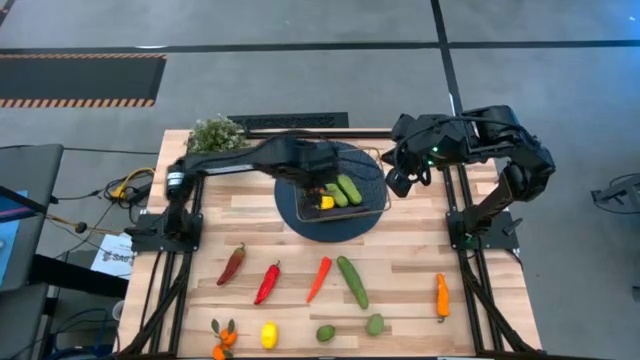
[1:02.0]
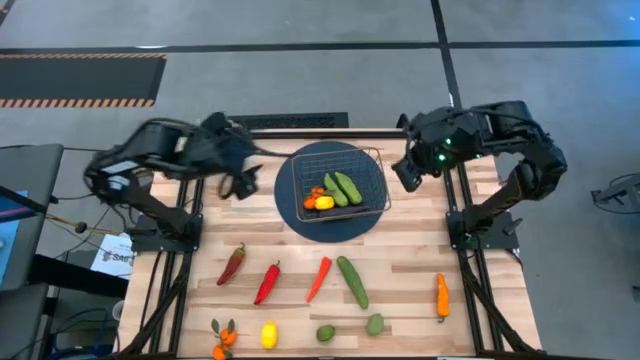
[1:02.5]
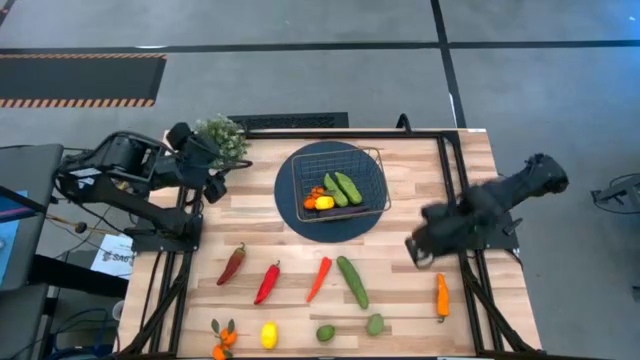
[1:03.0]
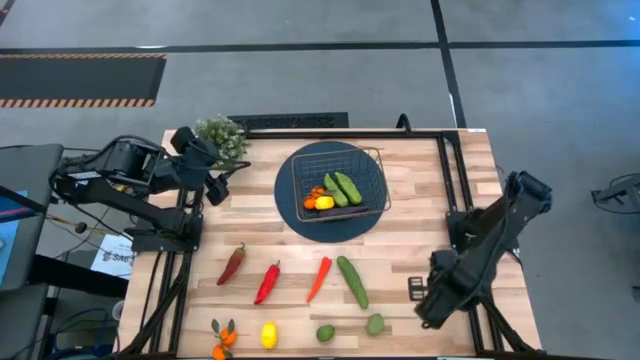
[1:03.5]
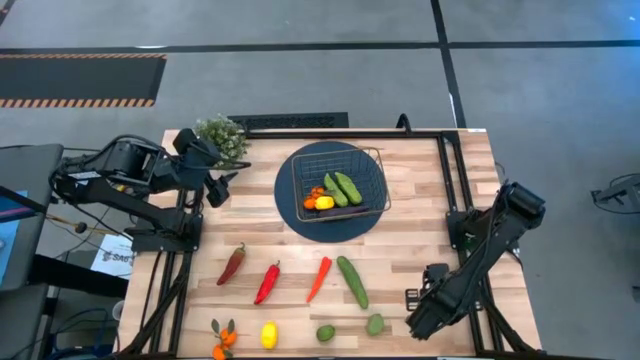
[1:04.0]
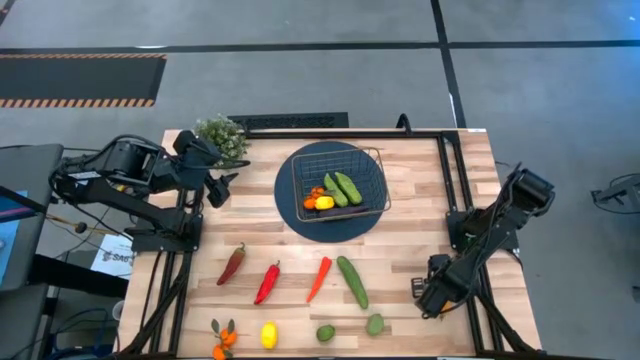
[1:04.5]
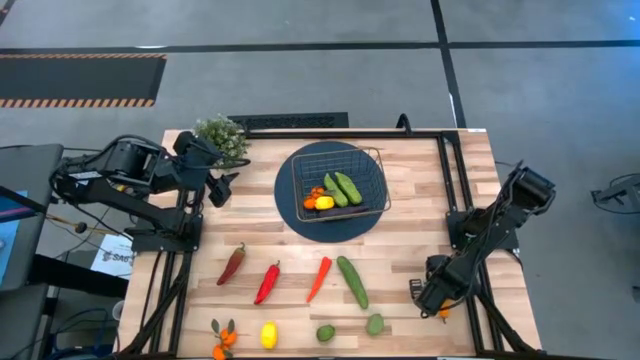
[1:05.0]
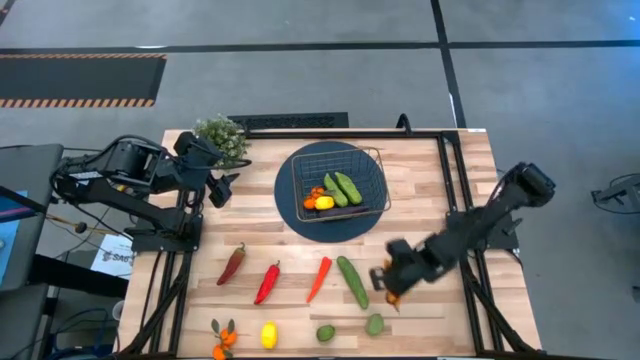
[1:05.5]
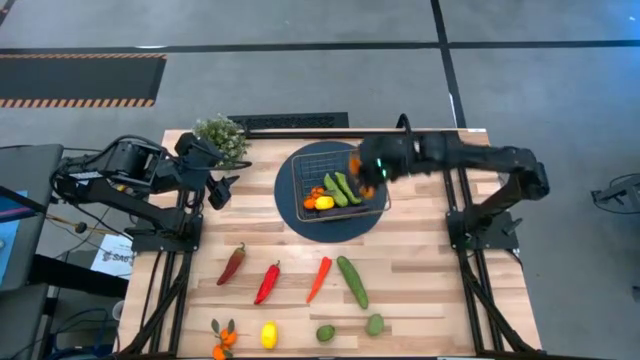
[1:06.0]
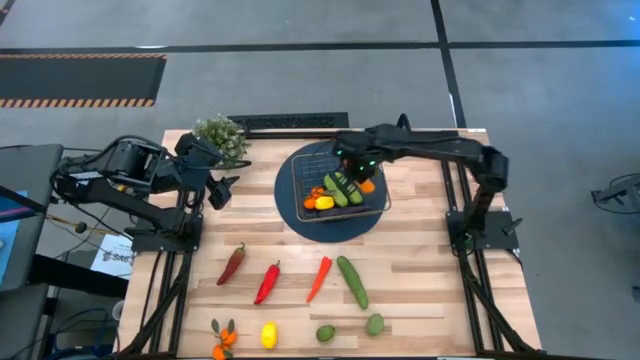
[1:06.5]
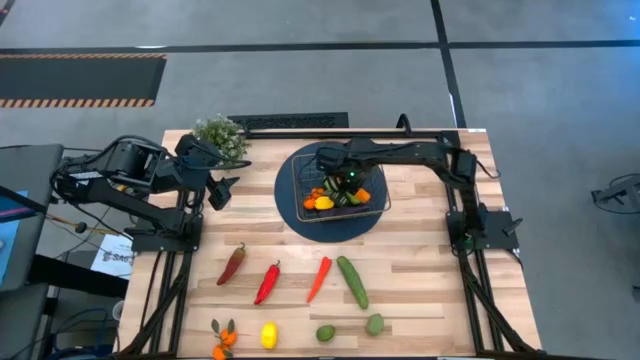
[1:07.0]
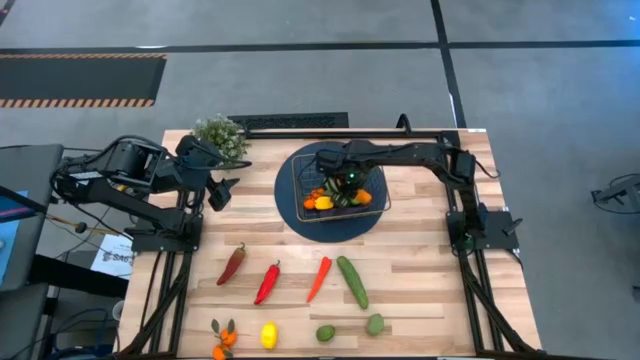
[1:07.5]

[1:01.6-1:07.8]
Task: Build produce basket
Put the orange bell pepper into the basket

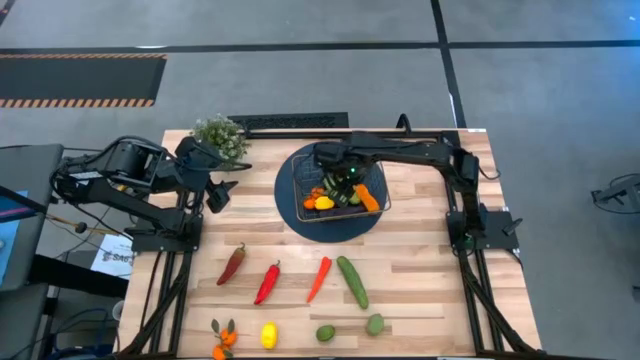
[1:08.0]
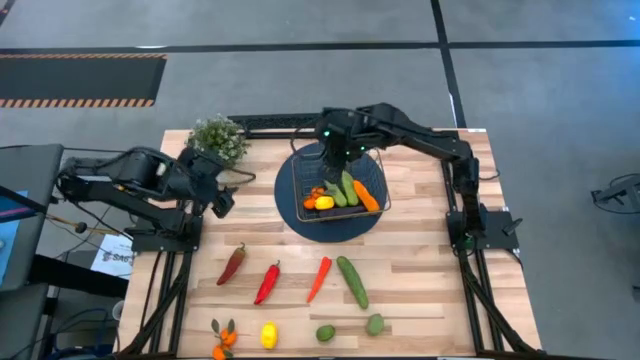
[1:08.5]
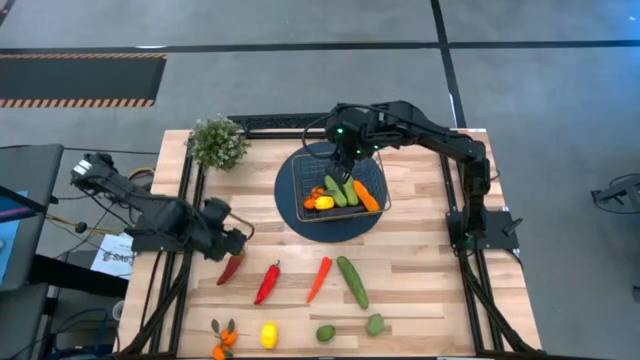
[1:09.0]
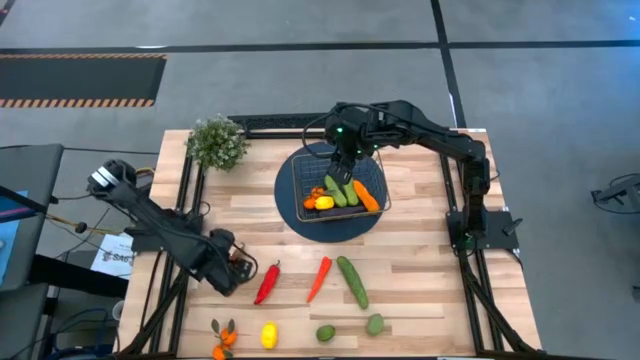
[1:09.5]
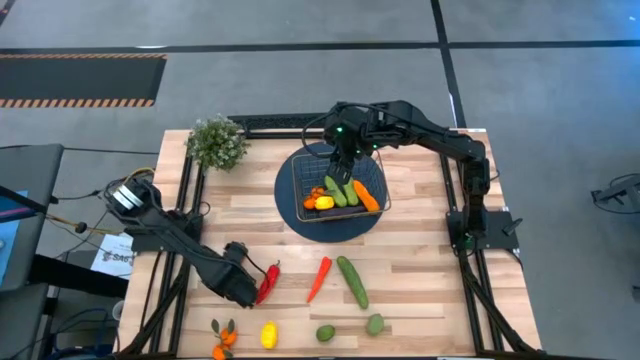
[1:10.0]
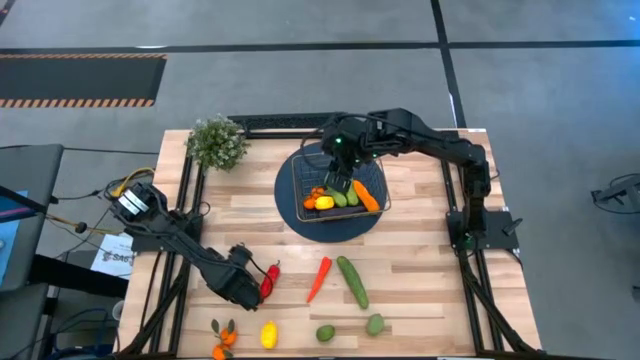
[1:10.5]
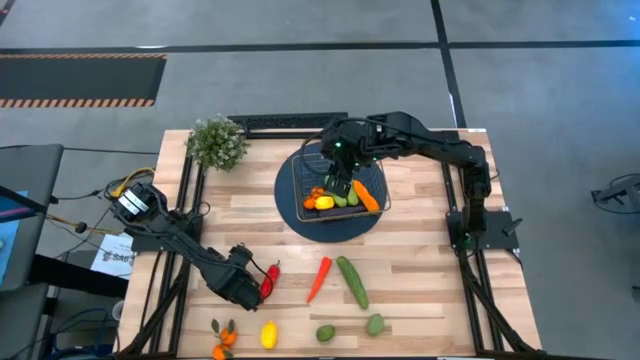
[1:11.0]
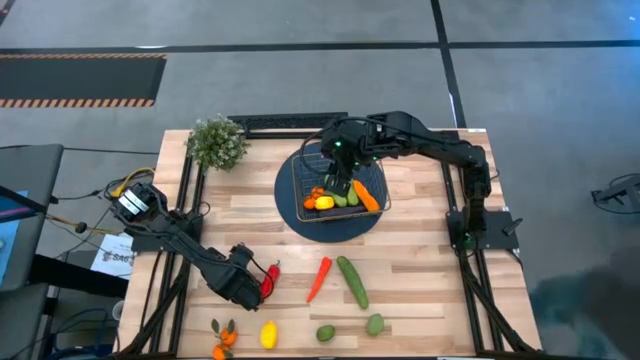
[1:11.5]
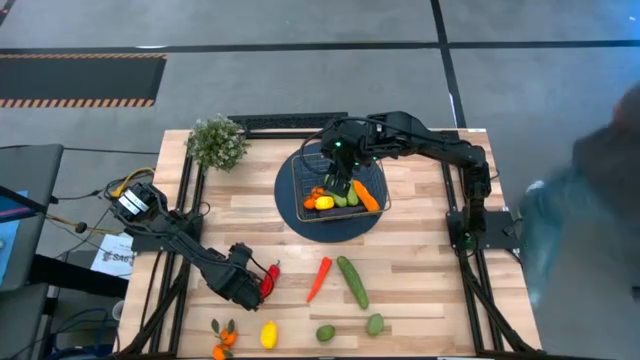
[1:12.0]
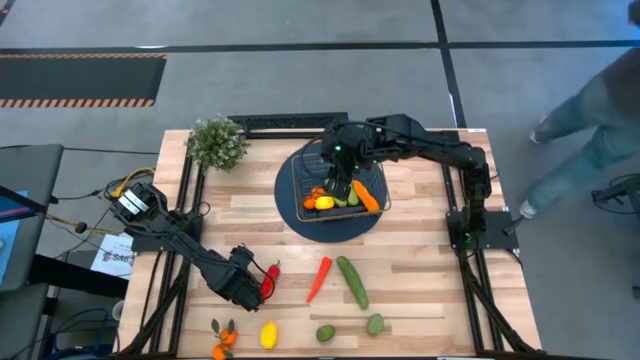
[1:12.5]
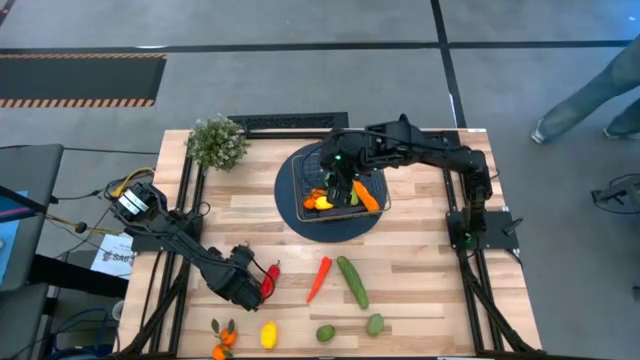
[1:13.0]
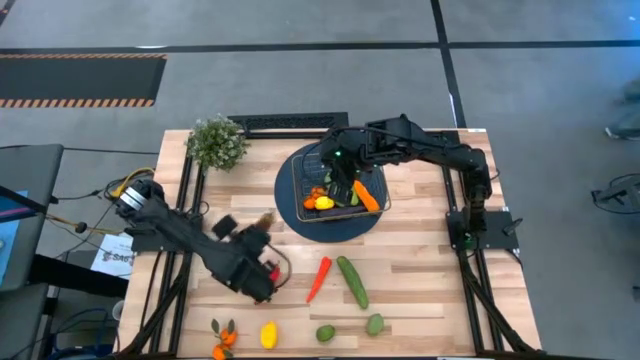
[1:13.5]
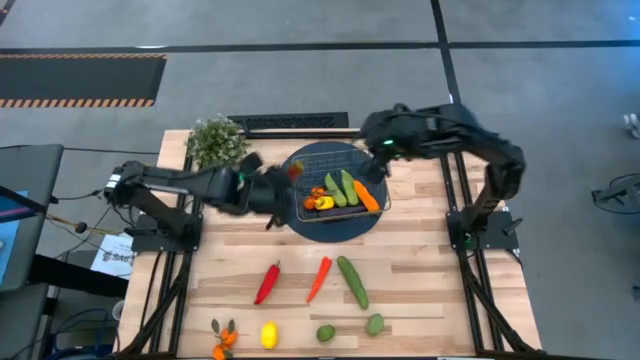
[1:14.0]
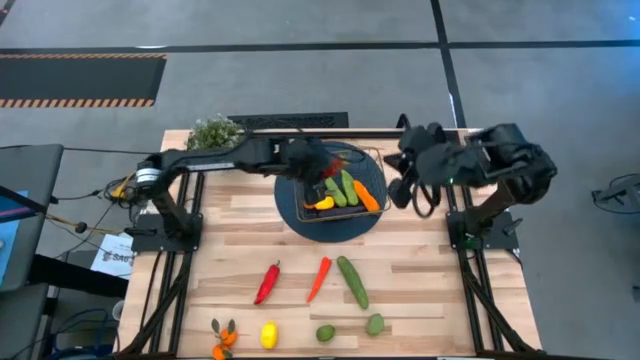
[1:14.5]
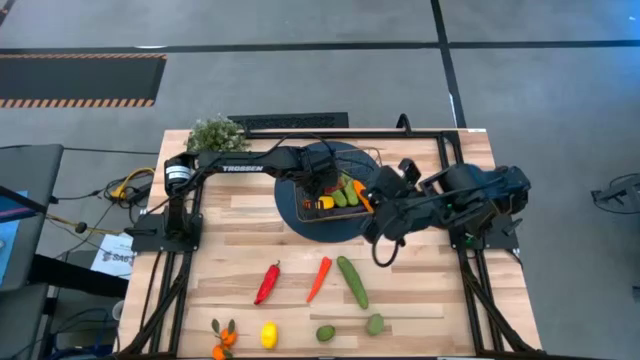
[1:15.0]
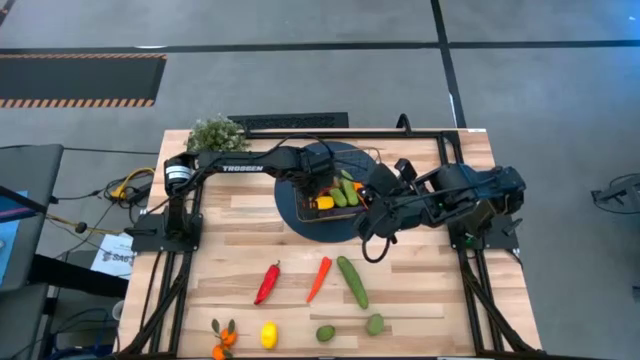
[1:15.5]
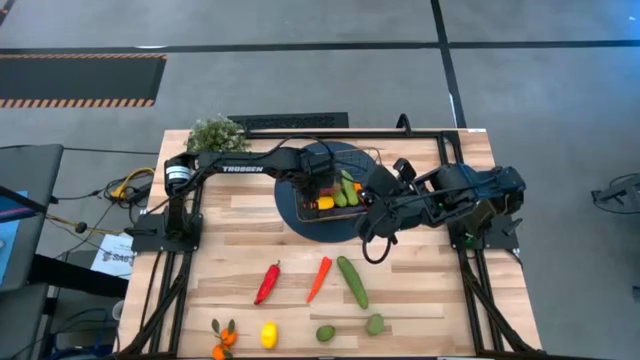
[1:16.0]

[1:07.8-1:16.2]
Put the dark red bell pepper into the basket

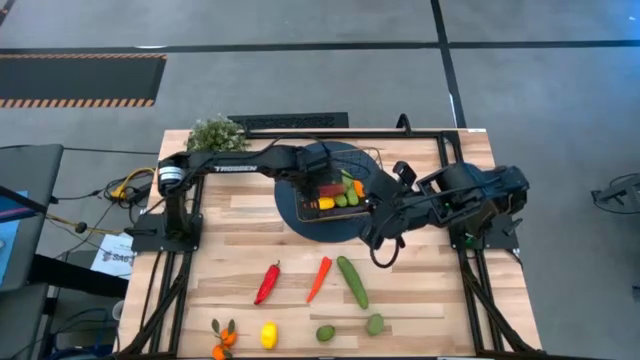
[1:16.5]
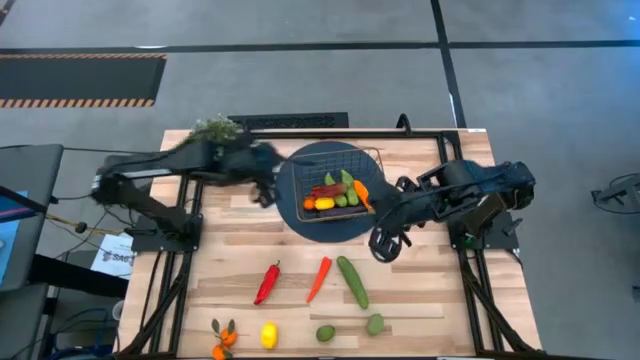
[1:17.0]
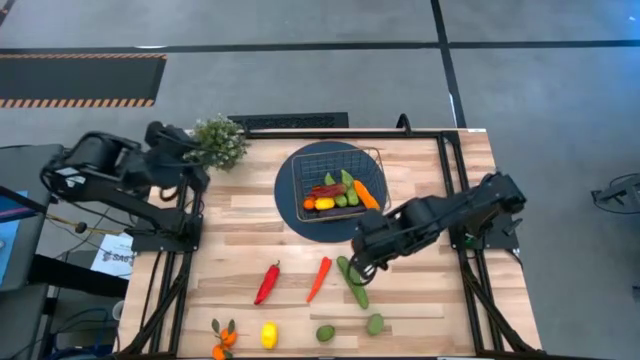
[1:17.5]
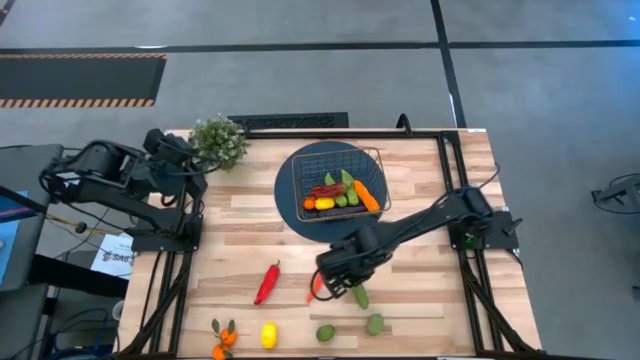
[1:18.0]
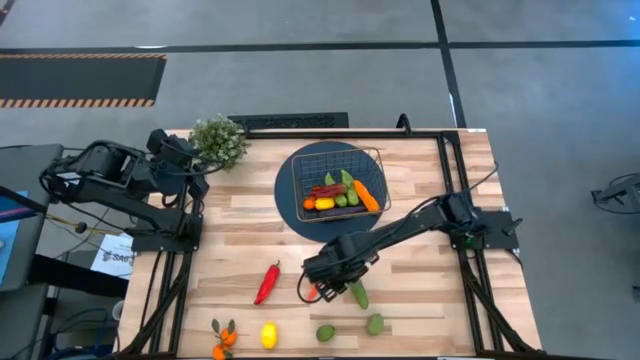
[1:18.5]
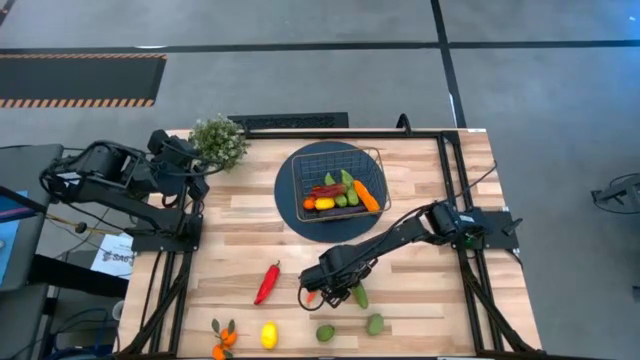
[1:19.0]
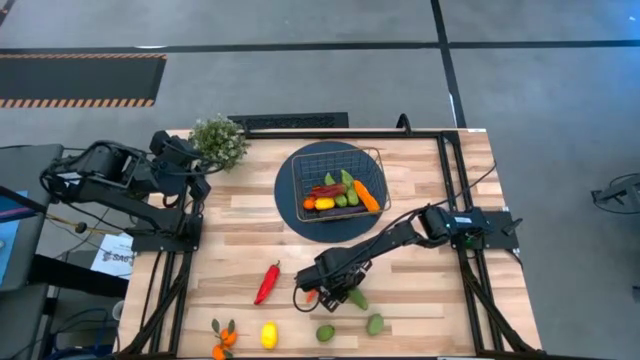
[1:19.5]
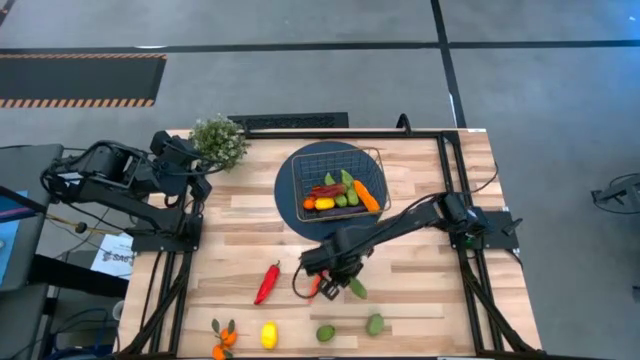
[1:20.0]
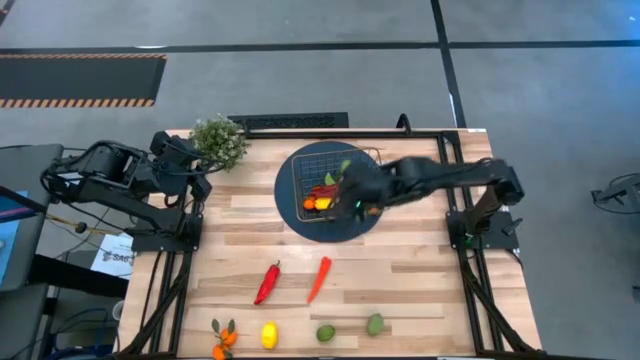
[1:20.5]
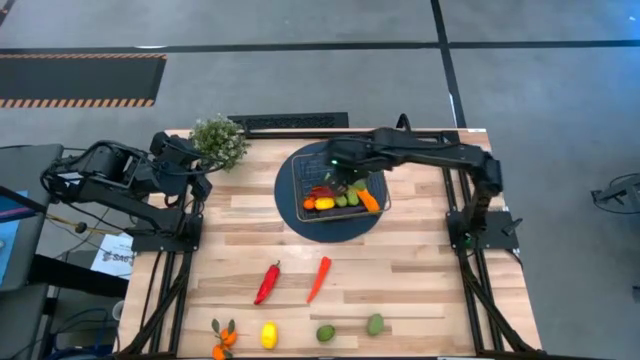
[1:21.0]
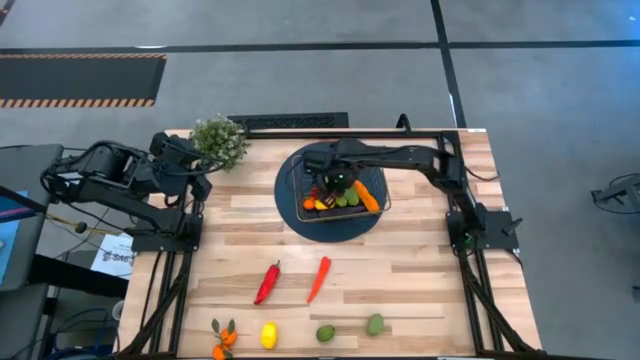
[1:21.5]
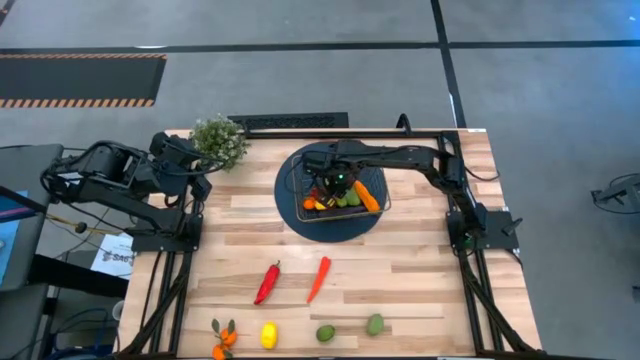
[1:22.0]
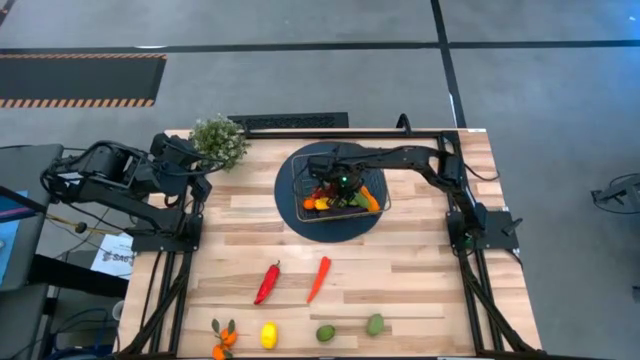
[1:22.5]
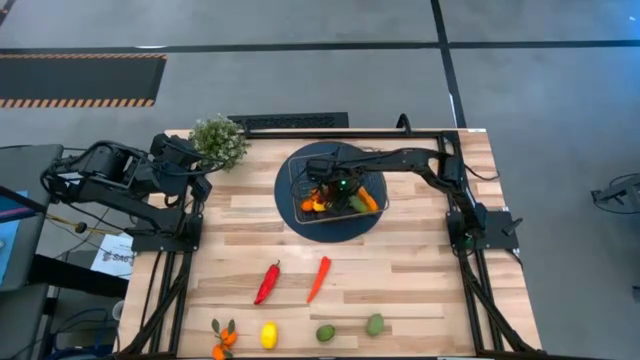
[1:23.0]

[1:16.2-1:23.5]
Put the cucumber into the basket
